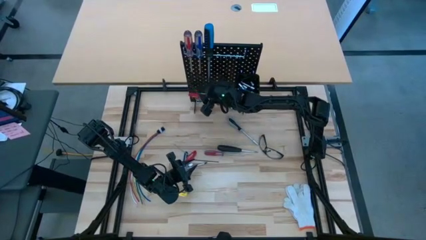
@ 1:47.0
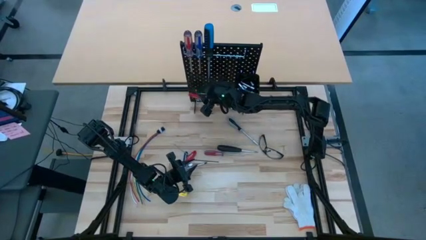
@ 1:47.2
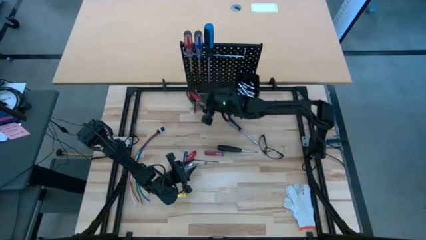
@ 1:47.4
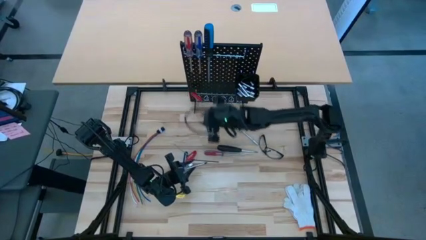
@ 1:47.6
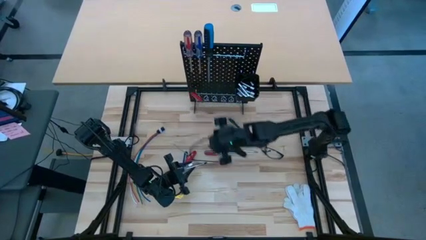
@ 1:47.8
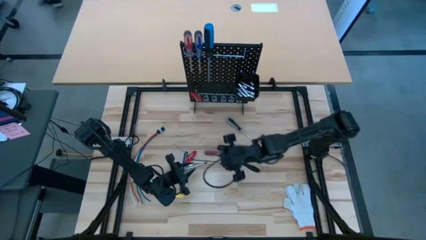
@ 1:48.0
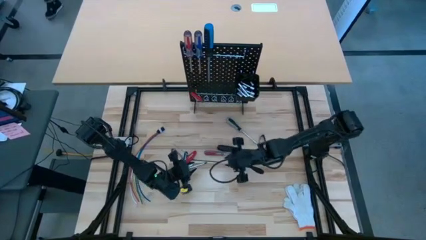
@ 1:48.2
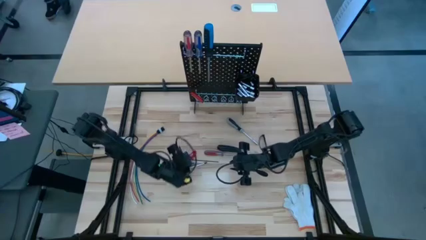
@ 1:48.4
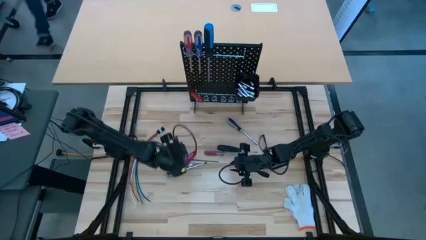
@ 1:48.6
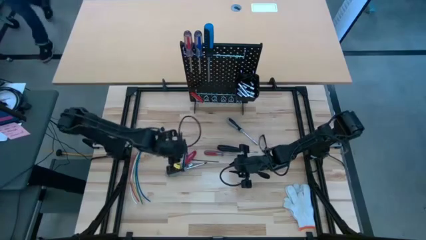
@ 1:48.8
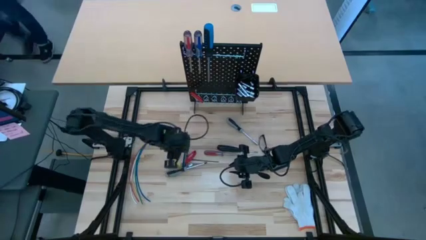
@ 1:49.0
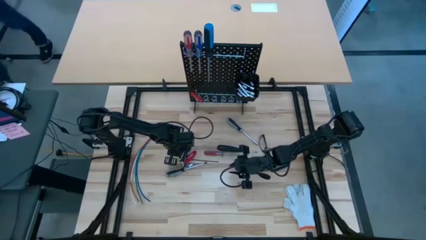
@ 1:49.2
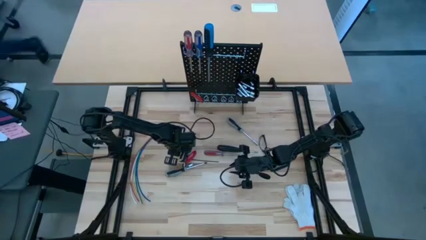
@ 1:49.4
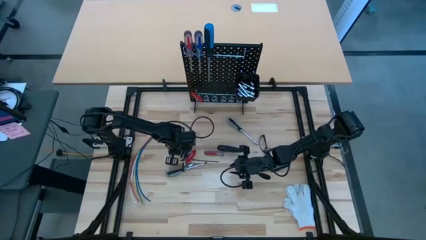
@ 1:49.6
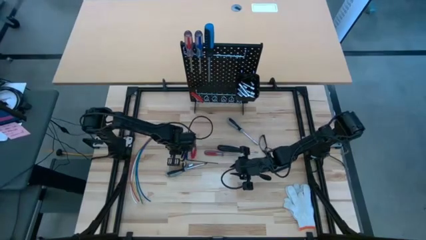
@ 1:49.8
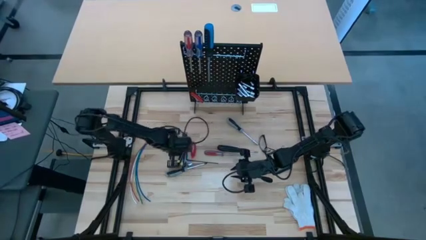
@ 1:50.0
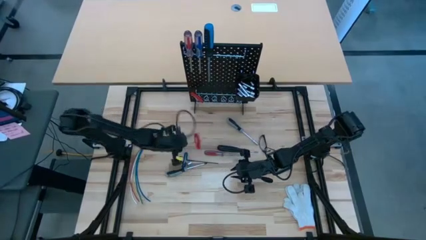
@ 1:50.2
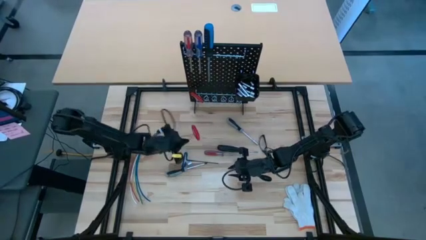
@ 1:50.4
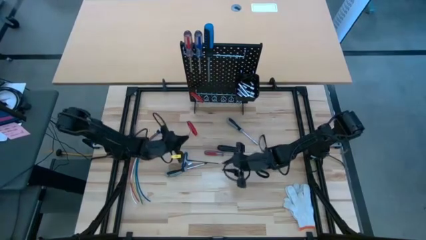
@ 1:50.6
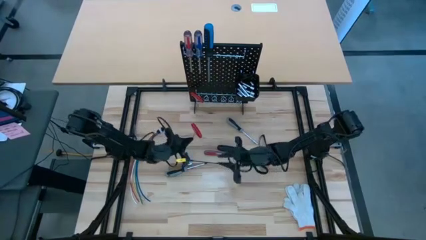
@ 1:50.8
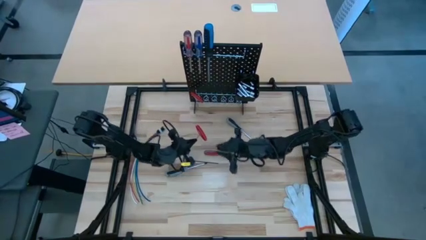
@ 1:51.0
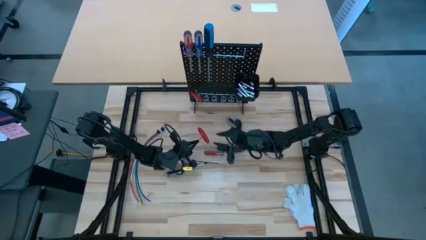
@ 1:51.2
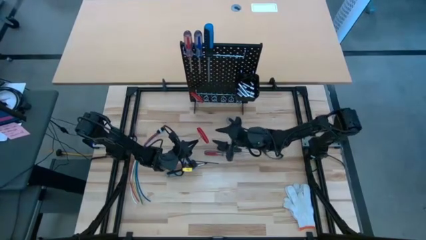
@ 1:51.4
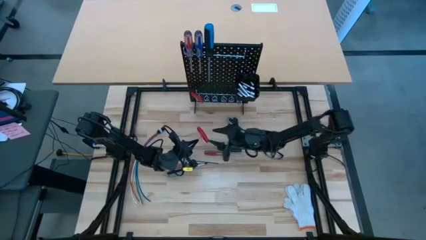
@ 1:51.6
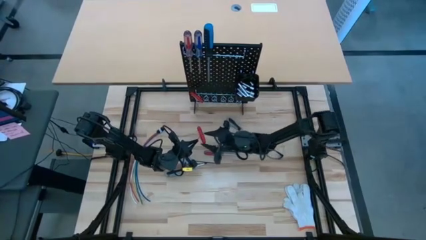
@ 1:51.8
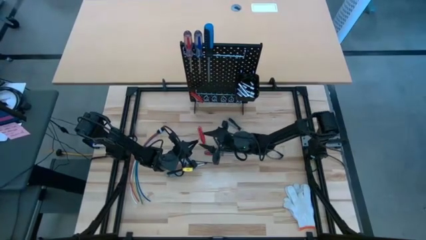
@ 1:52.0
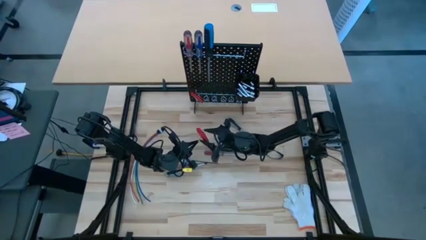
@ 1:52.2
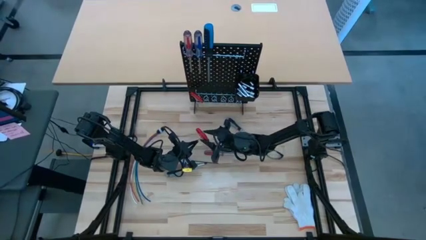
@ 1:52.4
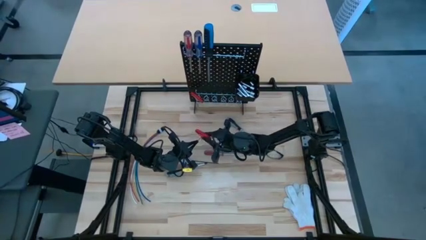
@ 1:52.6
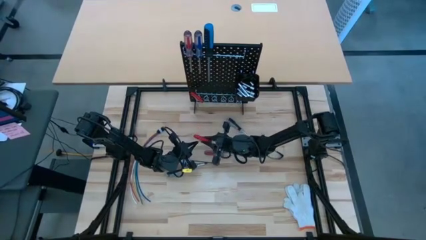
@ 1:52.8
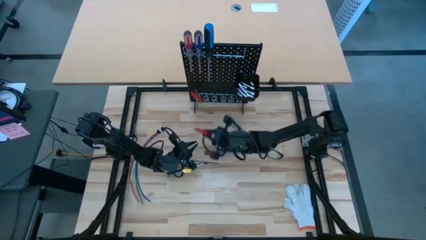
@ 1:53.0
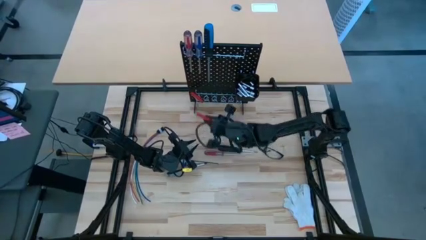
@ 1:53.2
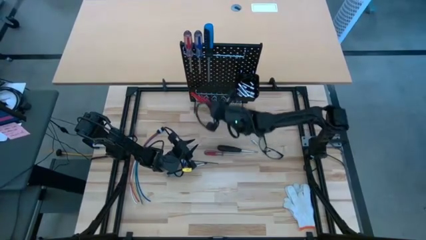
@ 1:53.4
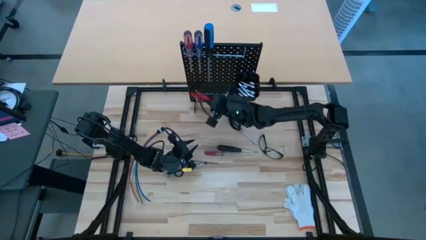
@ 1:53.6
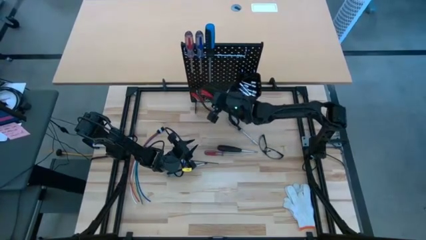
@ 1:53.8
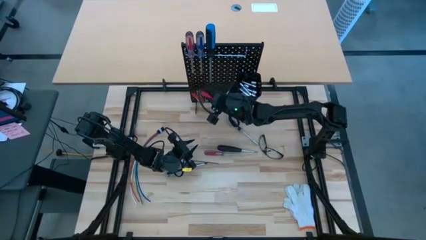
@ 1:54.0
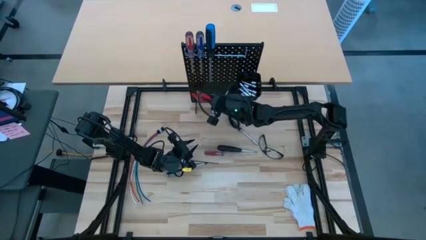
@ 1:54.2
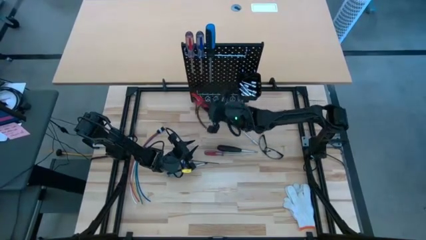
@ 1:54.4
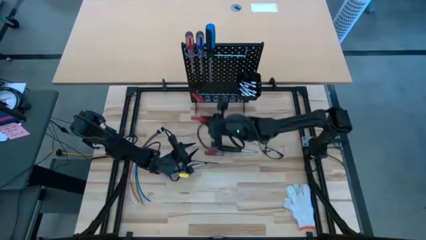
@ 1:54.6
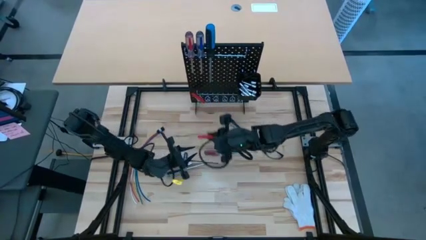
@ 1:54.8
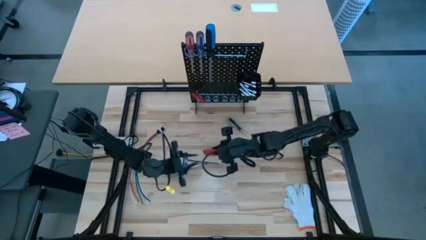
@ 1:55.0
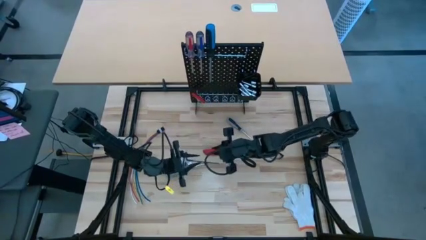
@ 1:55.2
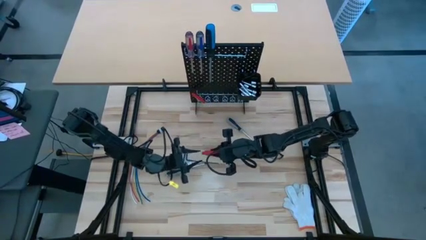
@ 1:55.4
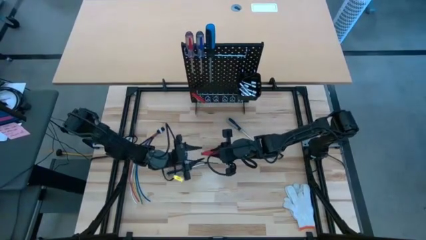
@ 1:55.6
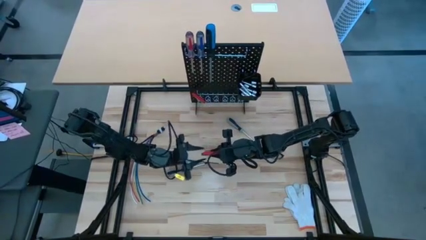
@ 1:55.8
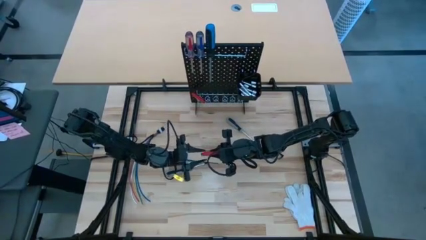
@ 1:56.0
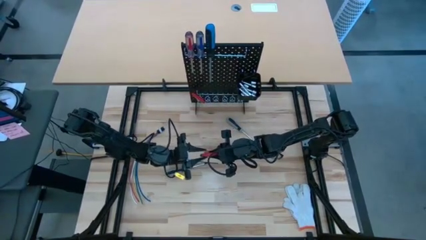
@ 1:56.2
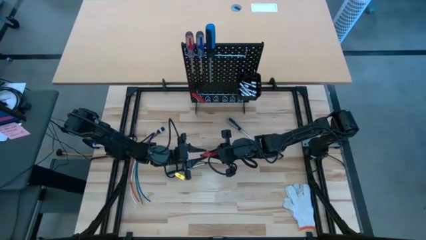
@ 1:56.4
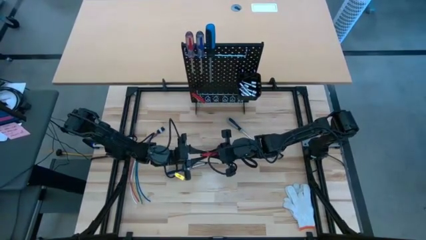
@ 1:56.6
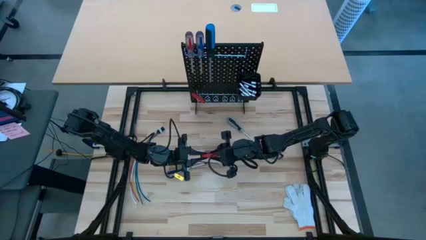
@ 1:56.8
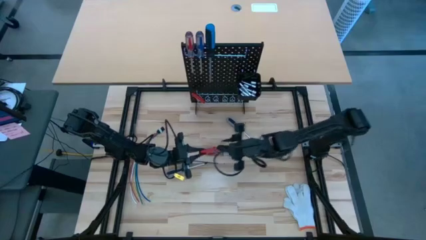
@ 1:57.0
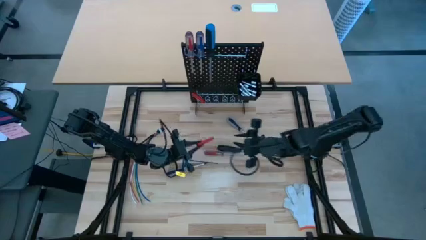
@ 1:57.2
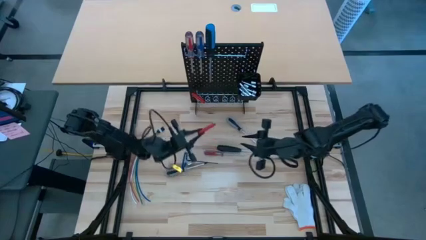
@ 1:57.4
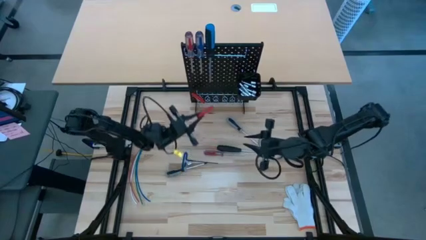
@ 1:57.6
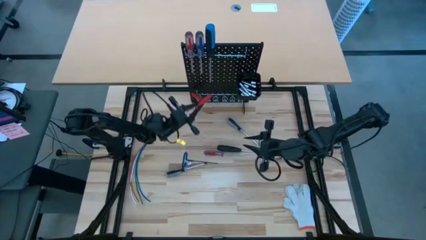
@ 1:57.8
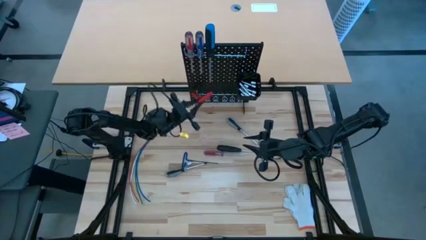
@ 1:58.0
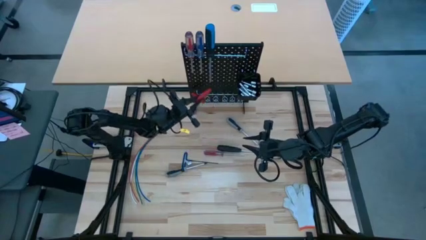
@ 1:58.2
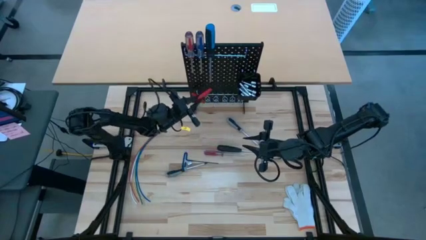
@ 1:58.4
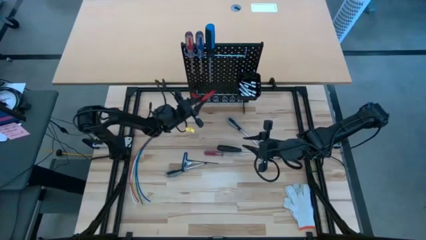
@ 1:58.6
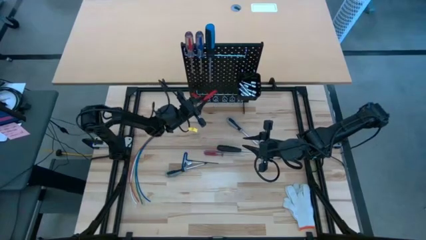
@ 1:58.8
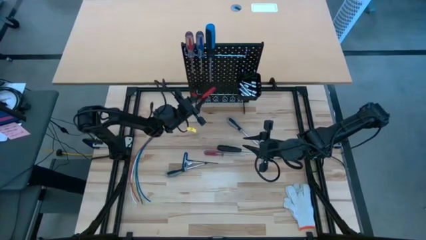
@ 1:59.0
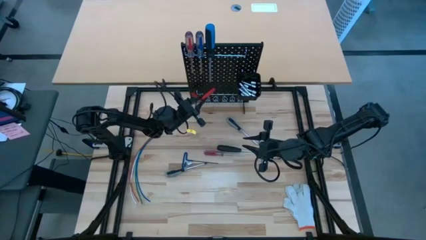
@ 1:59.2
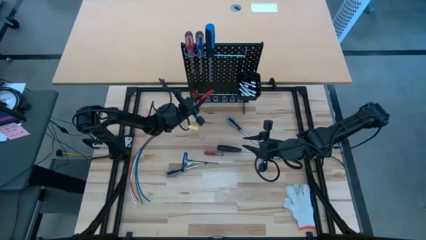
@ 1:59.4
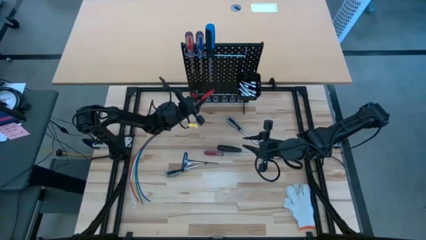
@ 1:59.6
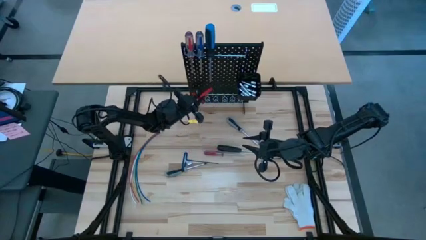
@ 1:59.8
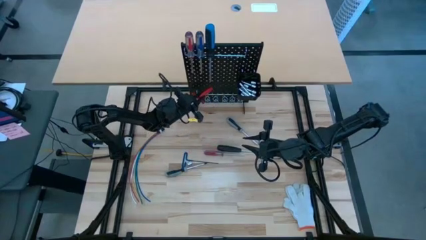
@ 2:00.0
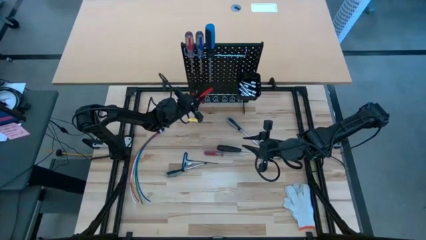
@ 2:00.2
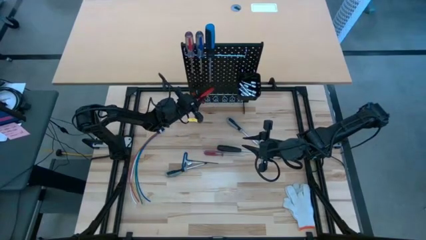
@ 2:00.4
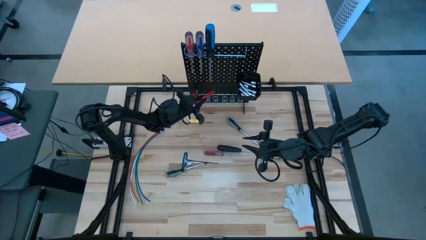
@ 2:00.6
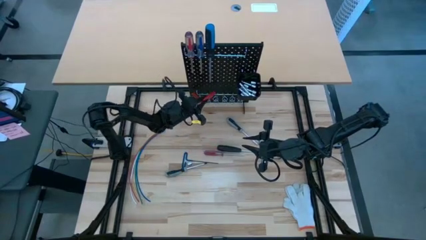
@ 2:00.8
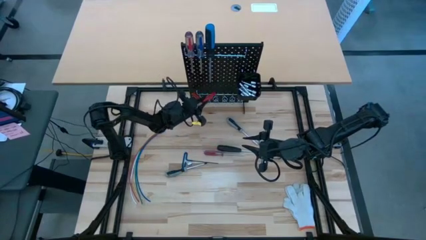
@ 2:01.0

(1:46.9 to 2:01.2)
Task: Hang tools onto peg board
Hang the allen wrench on the pegboard

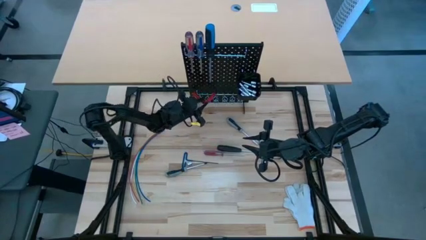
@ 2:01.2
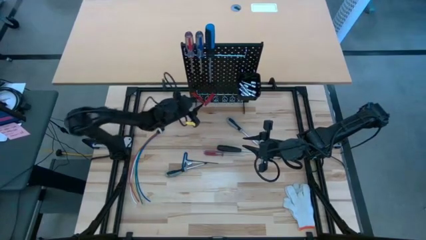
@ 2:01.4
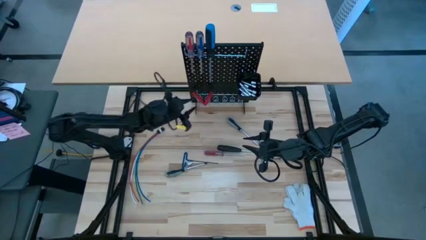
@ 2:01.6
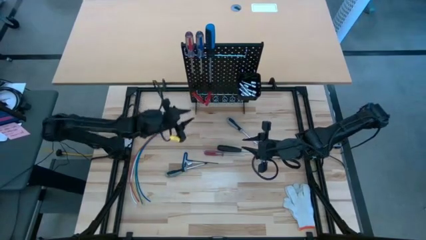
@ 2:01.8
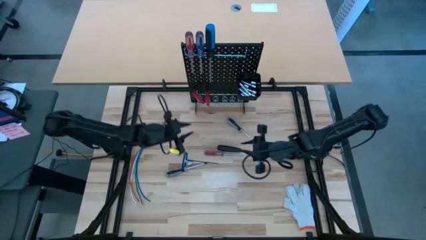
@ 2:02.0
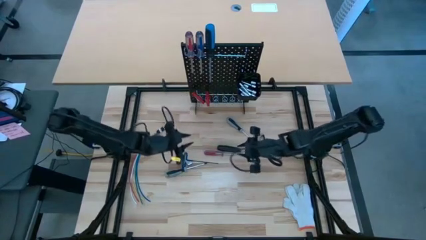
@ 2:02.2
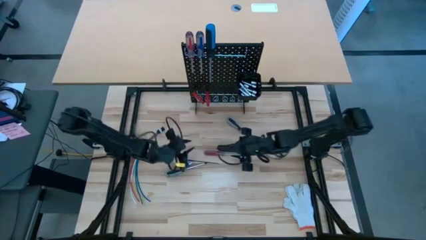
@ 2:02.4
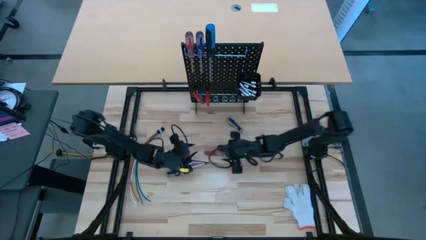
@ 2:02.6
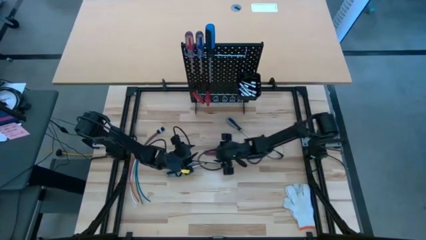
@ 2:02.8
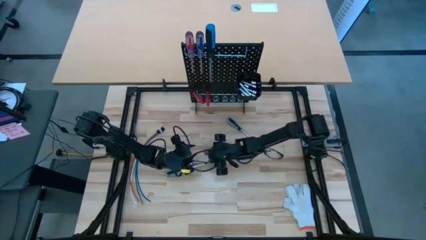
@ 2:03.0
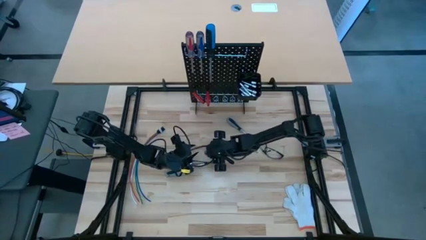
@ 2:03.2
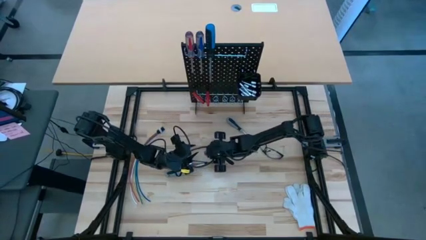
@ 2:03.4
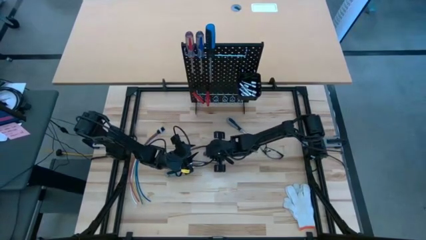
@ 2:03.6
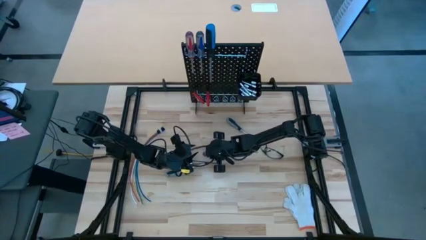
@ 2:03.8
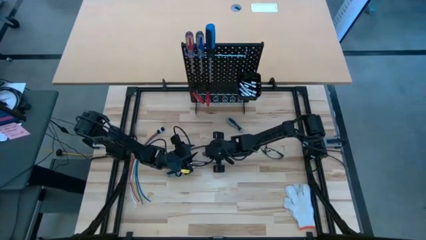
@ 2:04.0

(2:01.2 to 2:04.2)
Hang the red screwdriver on the pegboard
